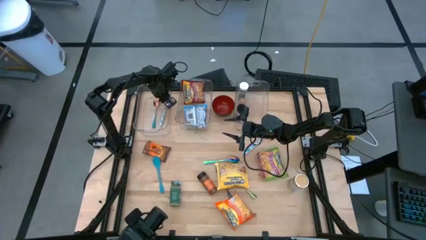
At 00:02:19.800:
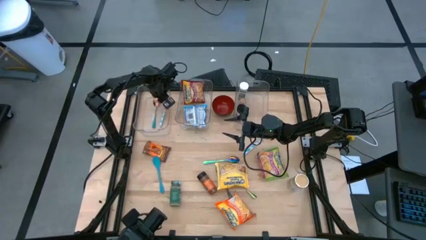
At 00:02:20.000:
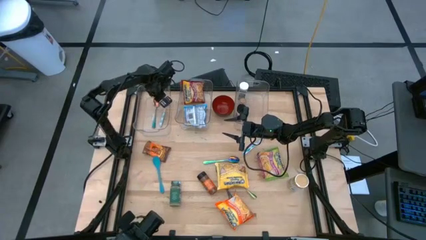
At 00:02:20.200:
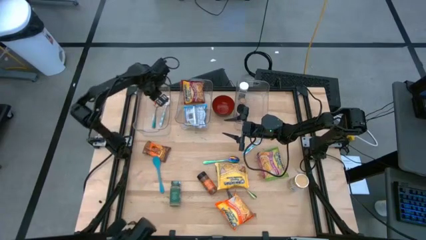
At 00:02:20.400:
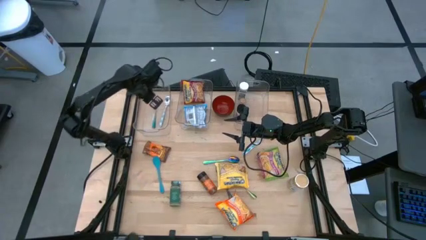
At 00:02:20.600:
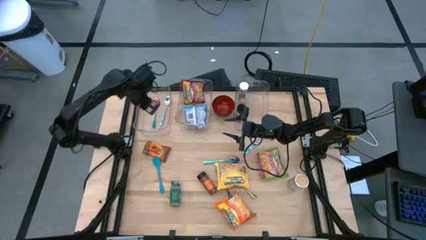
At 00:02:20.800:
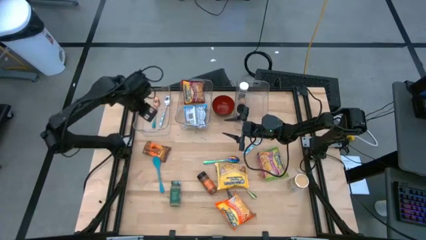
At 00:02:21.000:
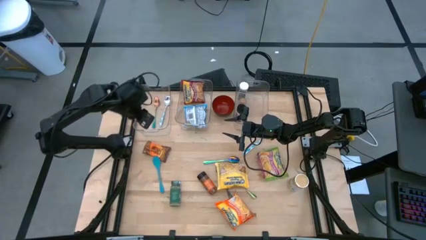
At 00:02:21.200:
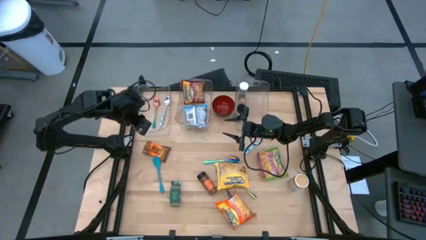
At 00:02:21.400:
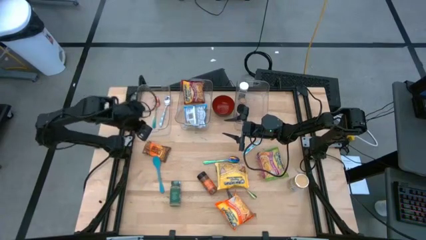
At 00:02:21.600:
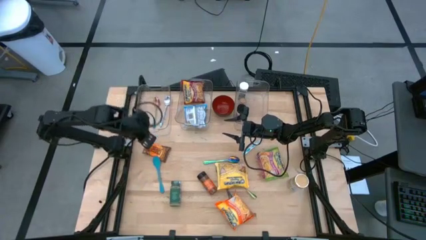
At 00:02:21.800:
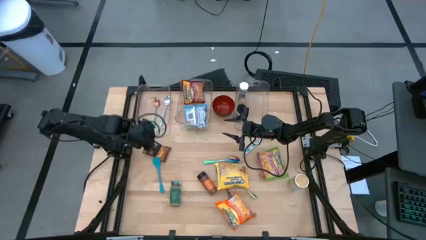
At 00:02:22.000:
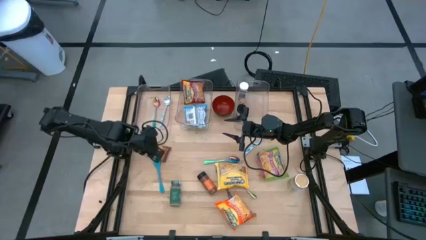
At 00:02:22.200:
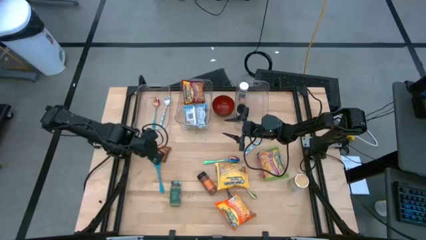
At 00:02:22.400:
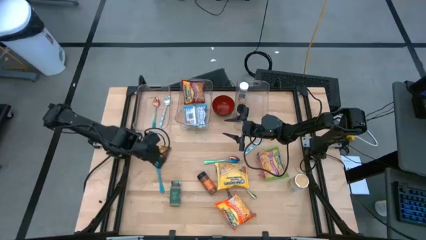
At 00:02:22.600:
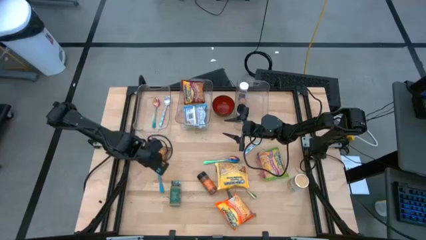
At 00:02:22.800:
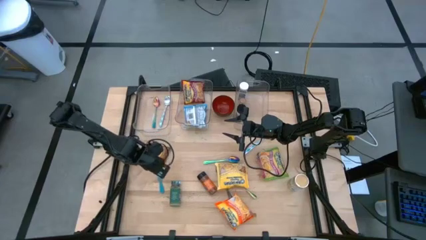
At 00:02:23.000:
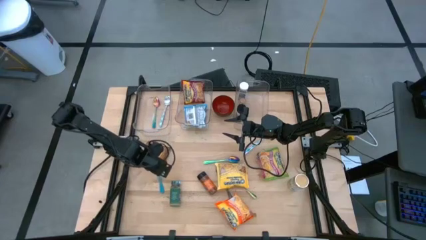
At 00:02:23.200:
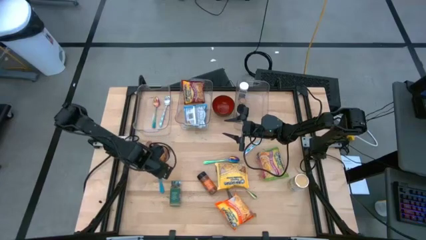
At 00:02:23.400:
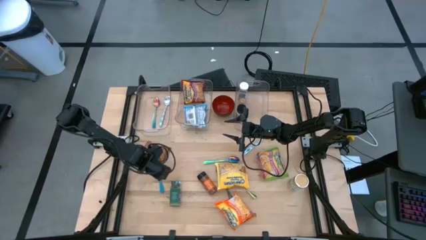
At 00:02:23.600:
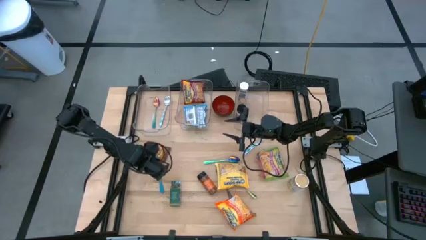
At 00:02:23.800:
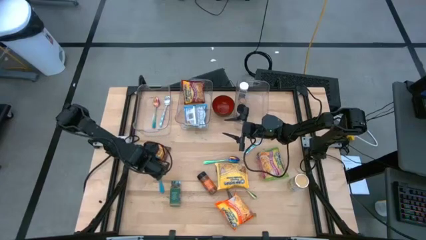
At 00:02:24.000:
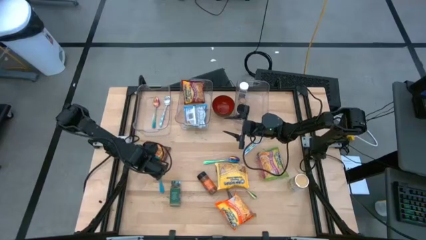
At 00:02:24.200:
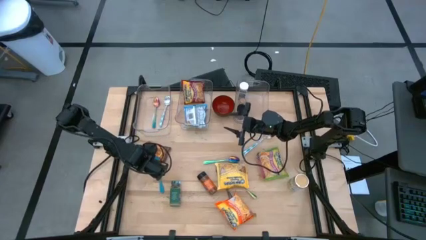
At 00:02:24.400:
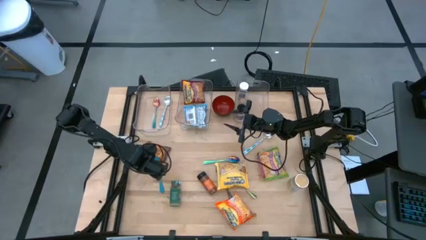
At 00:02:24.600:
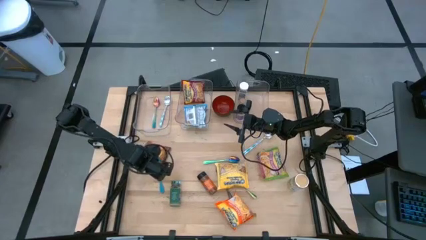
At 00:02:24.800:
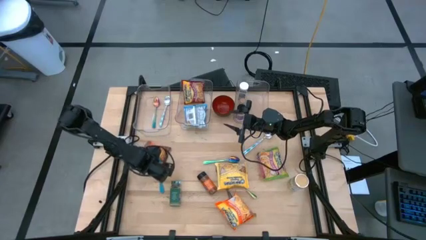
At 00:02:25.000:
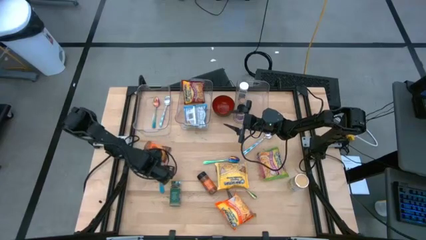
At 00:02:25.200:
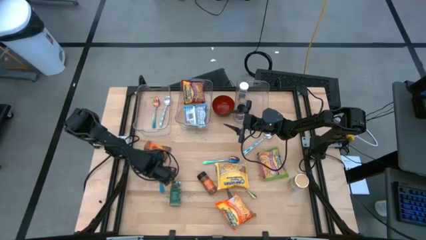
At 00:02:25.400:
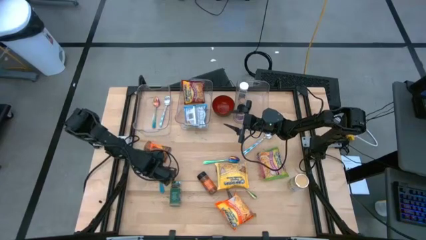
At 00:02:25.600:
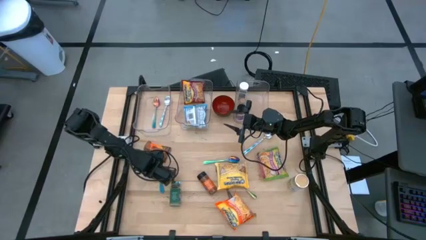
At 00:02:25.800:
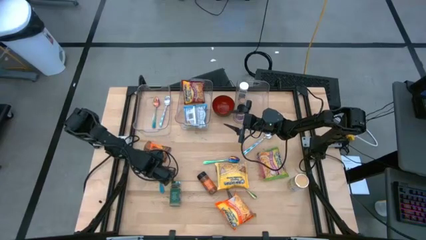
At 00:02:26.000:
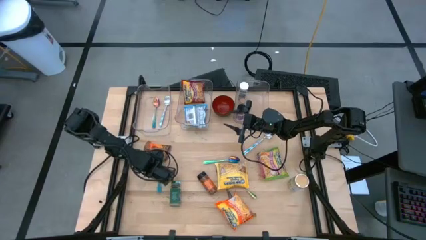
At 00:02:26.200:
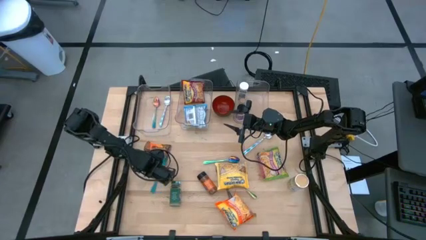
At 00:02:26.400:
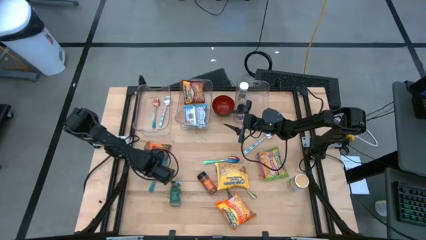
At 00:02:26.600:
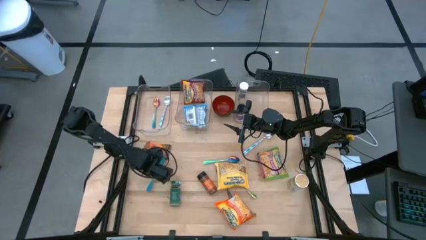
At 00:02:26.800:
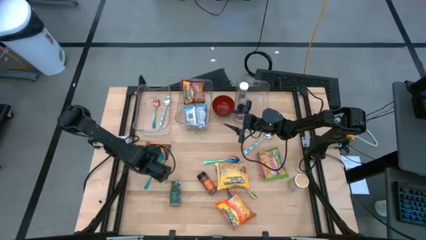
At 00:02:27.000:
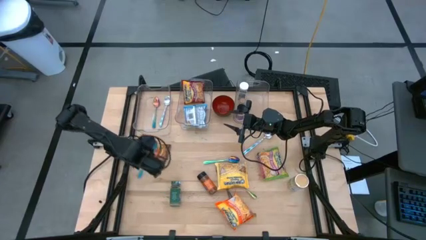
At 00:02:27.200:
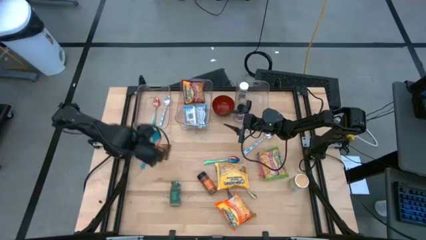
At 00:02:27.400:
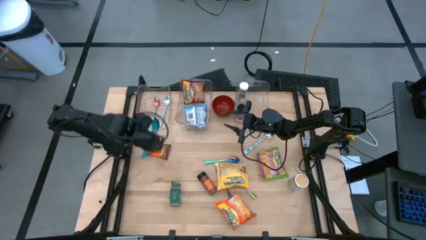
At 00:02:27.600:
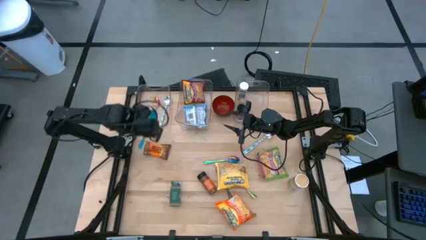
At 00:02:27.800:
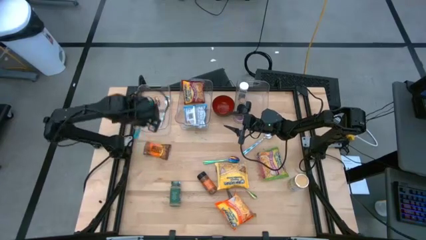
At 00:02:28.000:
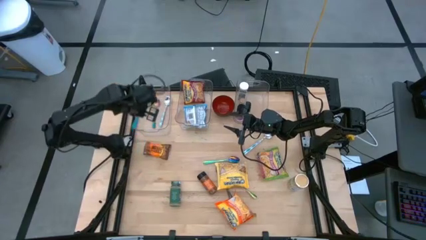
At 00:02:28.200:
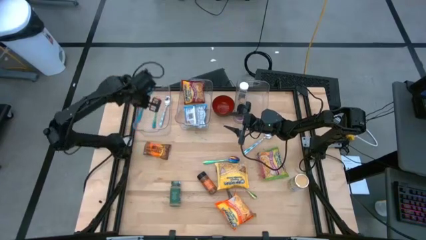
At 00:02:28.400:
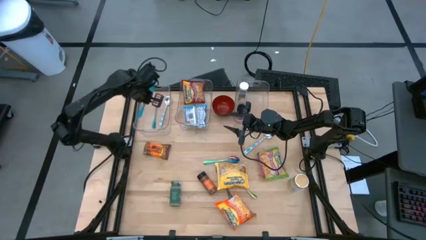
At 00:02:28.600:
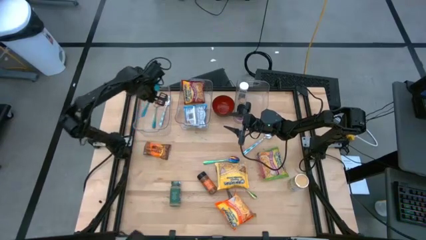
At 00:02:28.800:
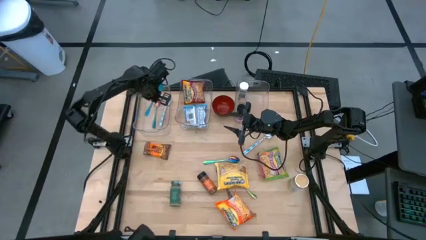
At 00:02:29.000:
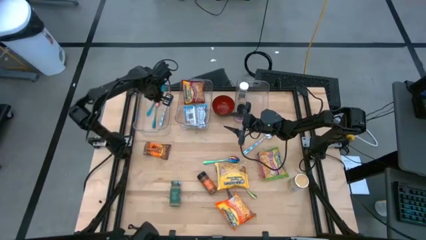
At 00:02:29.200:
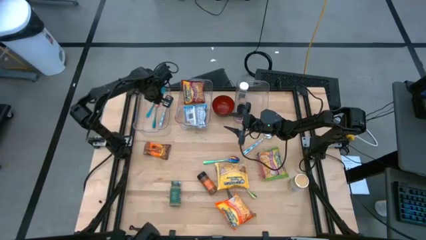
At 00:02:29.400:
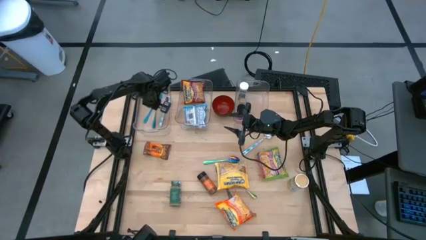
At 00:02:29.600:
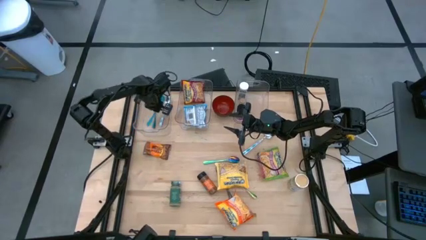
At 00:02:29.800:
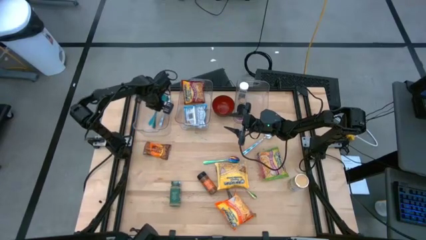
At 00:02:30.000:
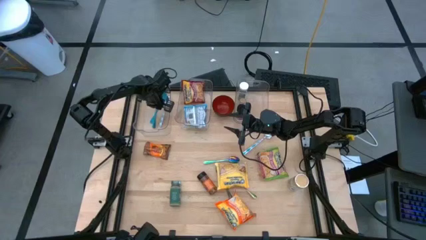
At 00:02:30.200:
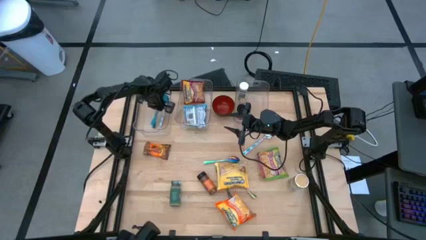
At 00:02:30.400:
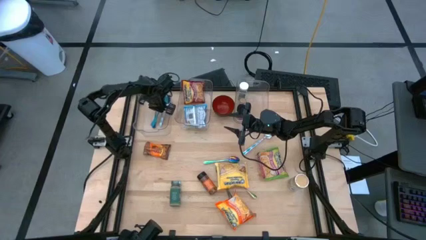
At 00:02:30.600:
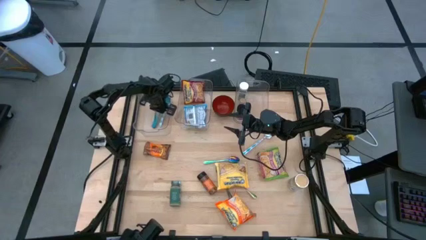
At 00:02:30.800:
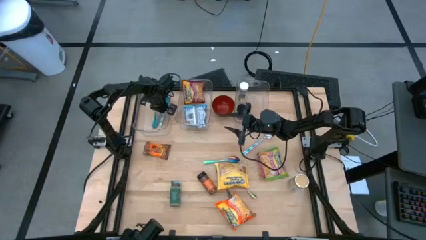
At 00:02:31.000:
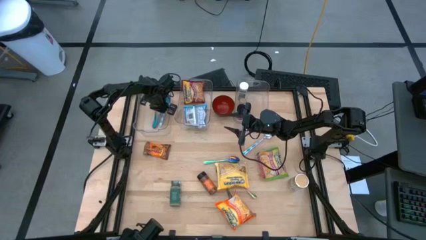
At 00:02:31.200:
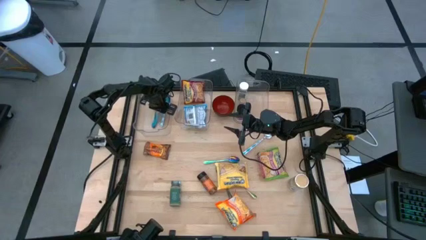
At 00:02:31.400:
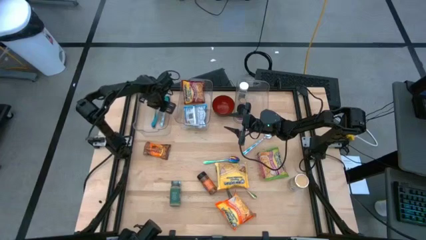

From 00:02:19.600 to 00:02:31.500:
Task: Pick & Place Food Item
Put the blue baby spoon into the left transparent bin
